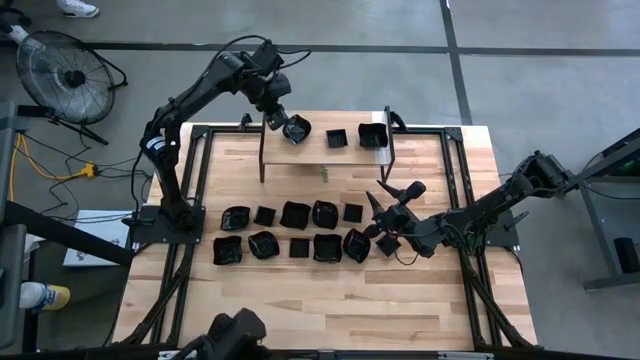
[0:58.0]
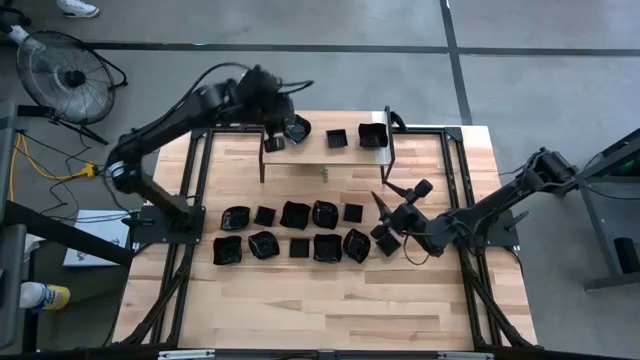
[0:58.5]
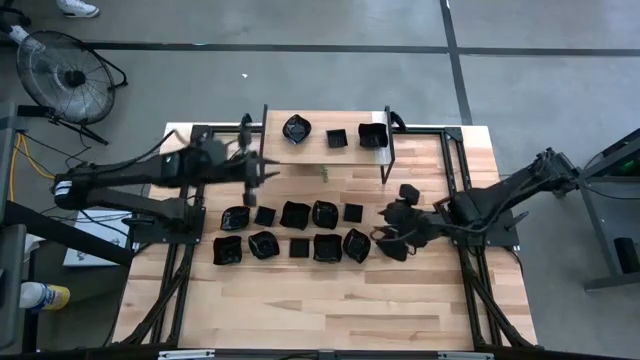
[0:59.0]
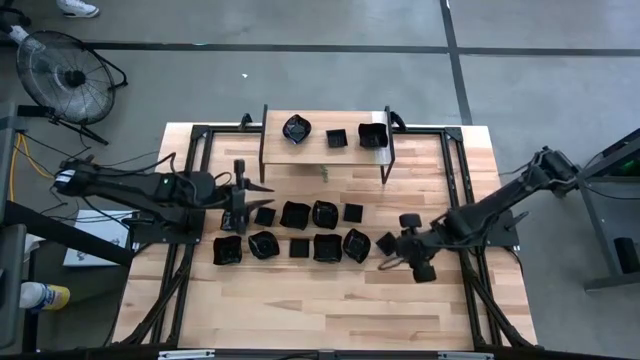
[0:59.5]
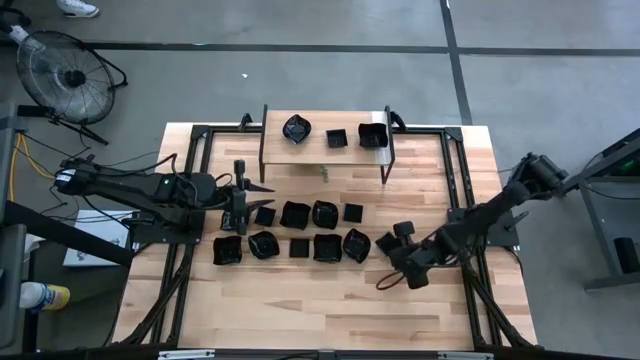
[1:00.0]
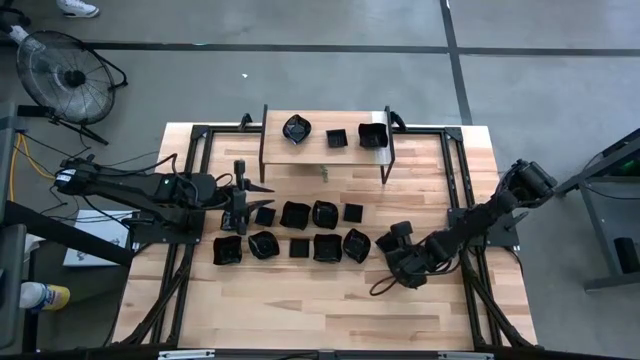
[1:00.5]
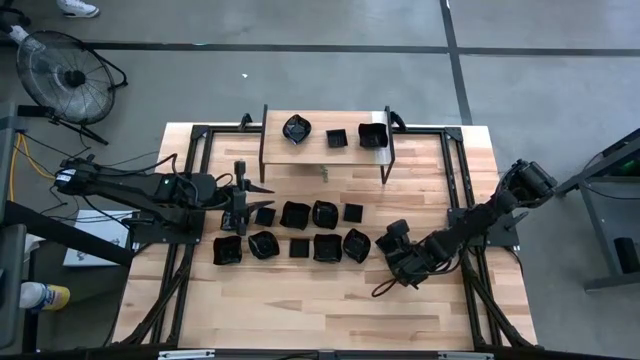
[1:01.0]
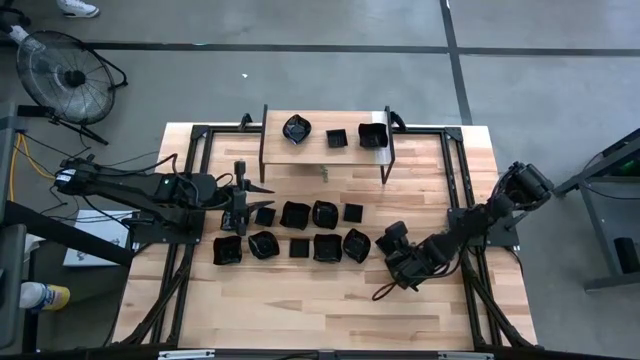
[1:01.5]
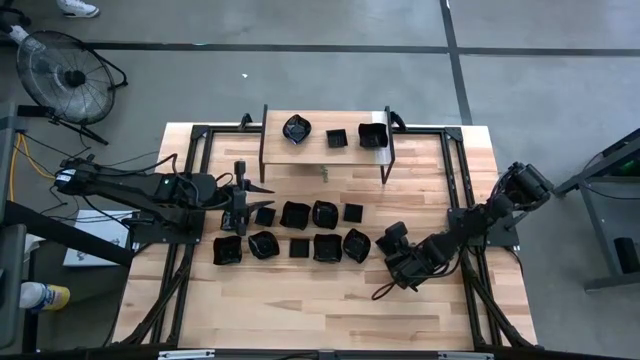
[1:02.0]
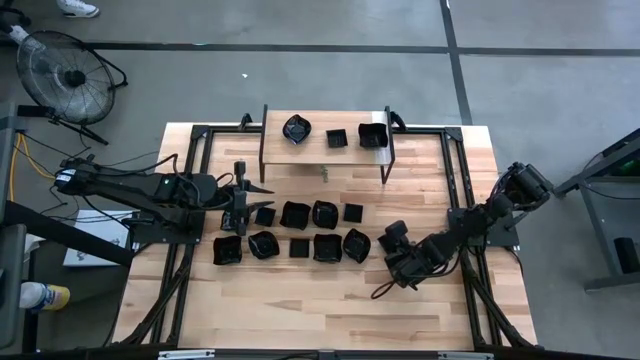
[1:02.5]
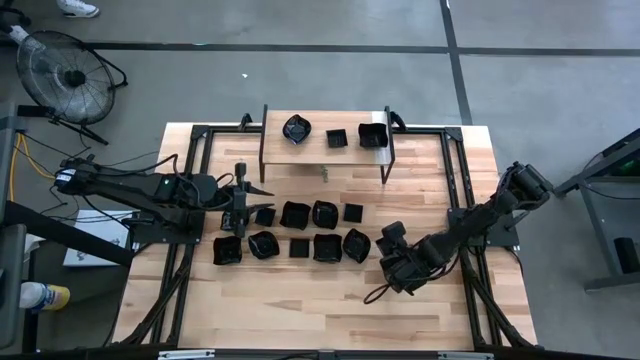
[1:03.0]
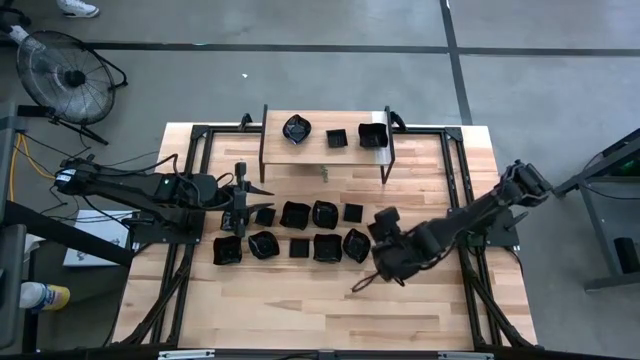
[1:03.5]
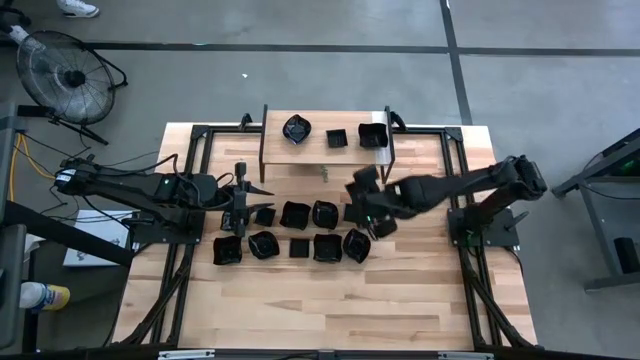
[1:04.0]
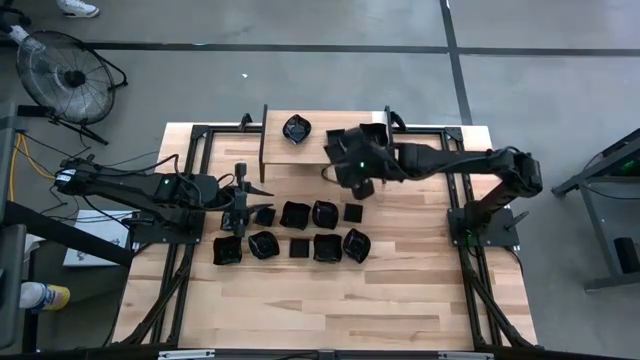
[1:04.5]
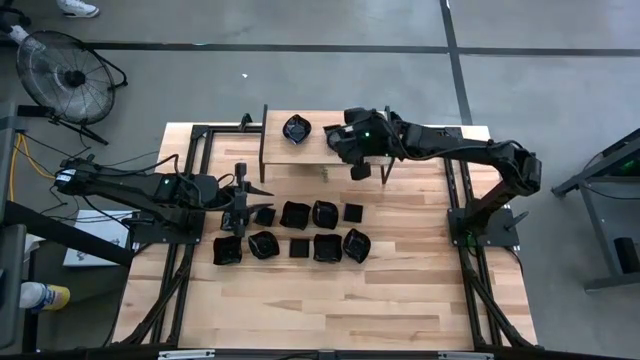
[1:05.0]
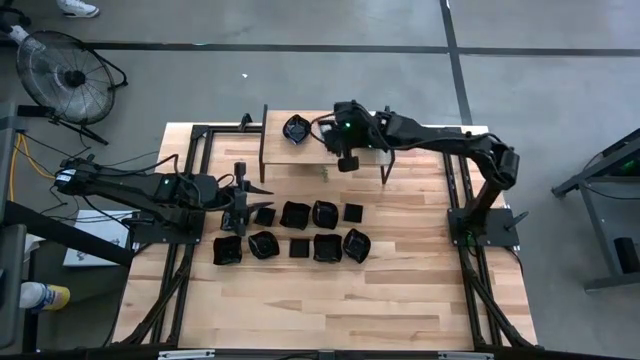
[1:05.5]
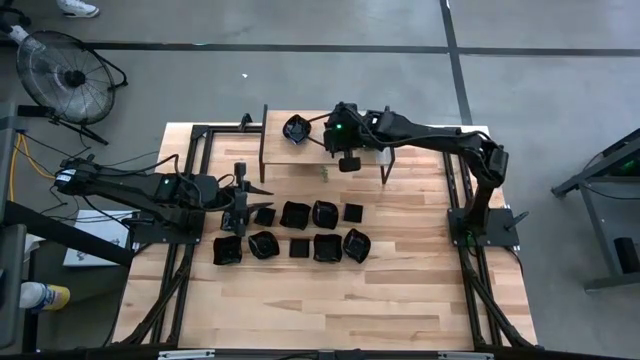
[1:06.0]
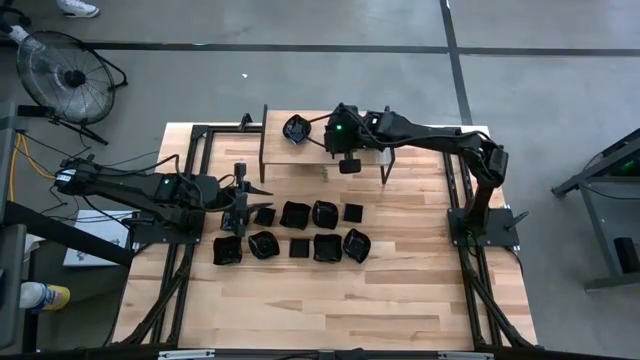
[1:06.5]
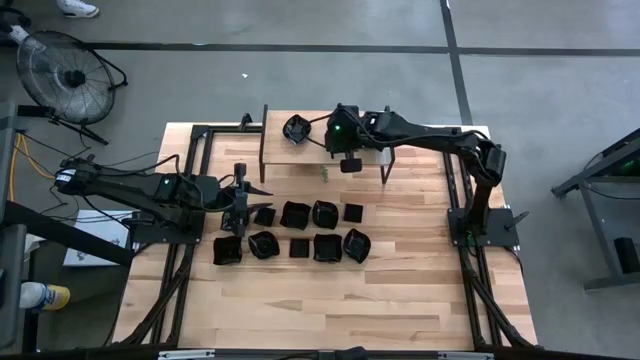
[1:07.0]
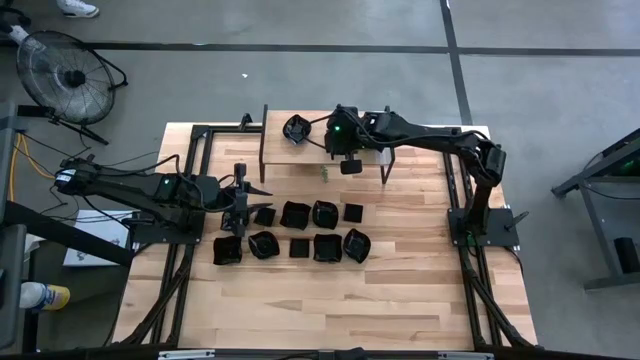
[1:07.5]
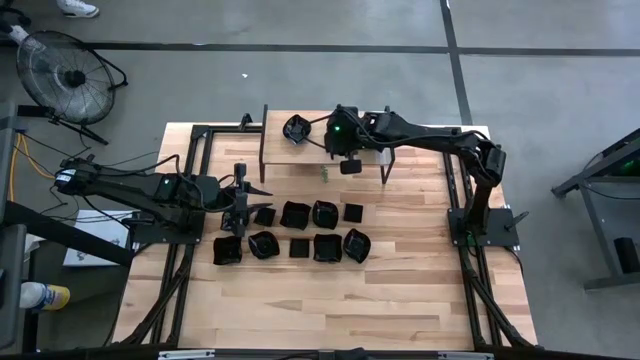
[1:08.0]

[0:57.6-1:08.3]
Task: Pick & Place Mini shaped plates
Stack the square plate on top of the other square plate on the shelf

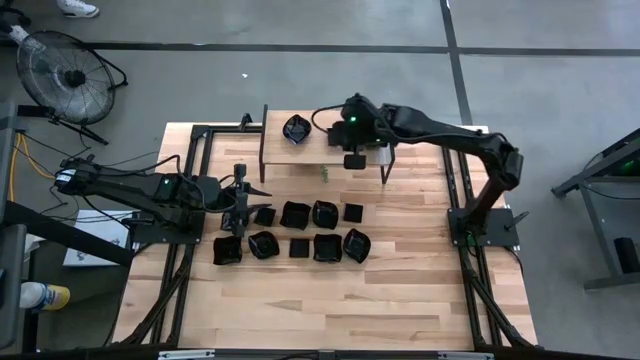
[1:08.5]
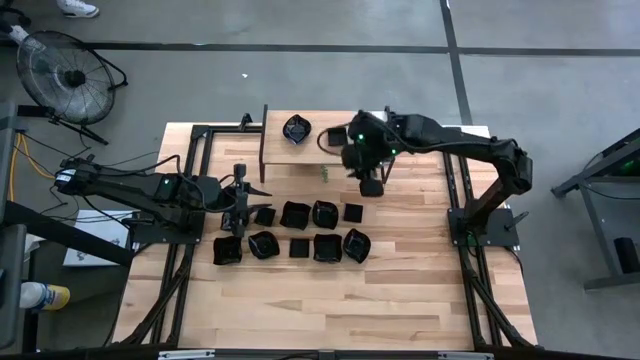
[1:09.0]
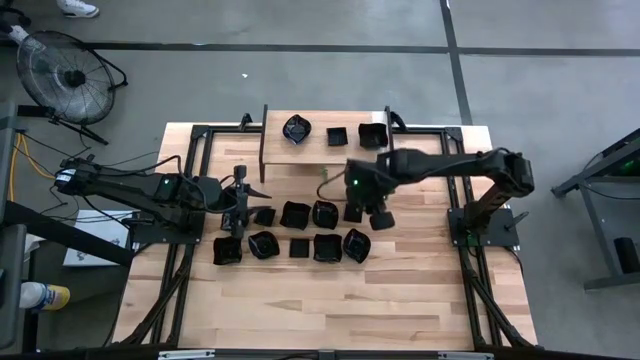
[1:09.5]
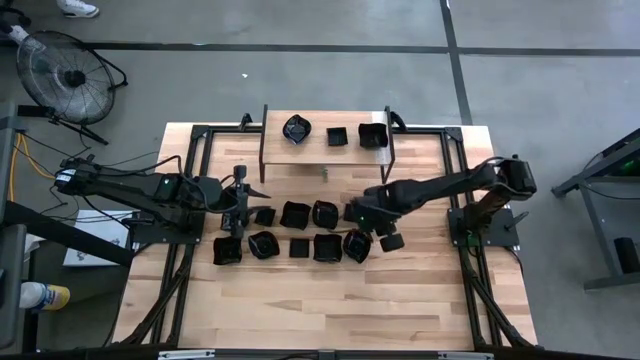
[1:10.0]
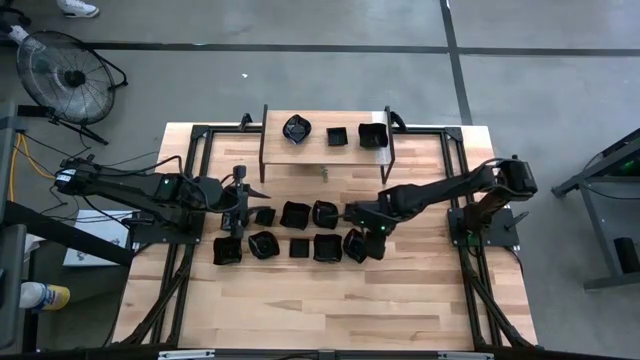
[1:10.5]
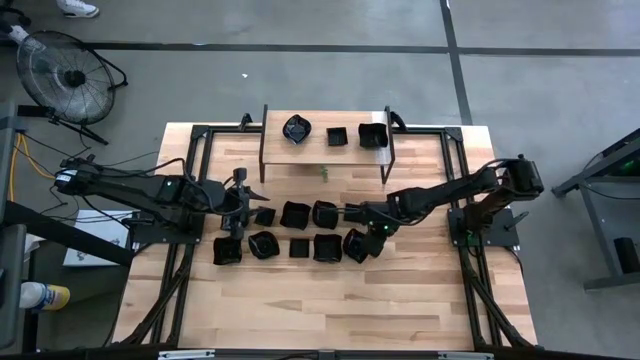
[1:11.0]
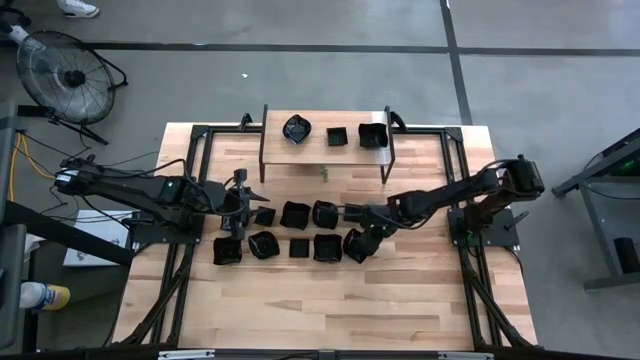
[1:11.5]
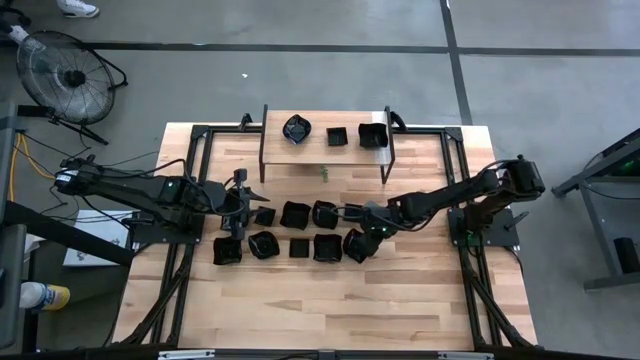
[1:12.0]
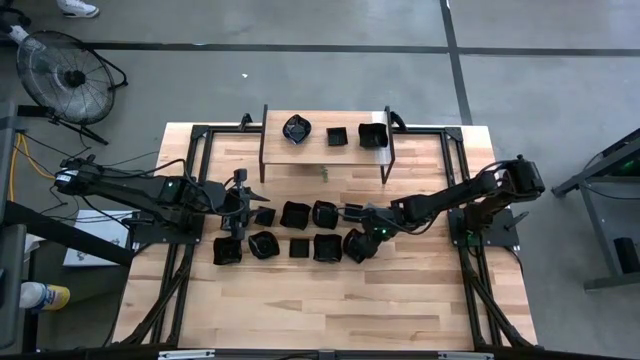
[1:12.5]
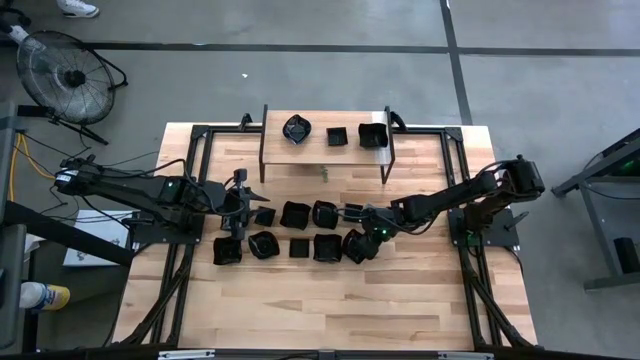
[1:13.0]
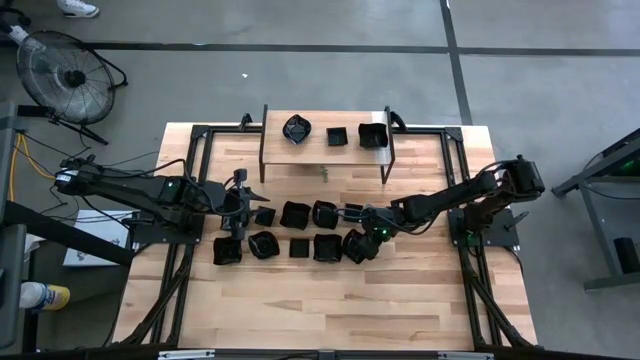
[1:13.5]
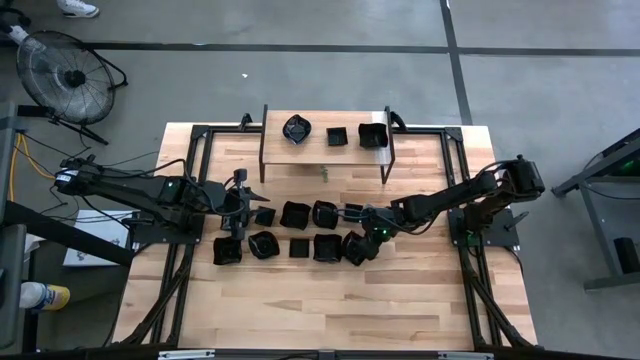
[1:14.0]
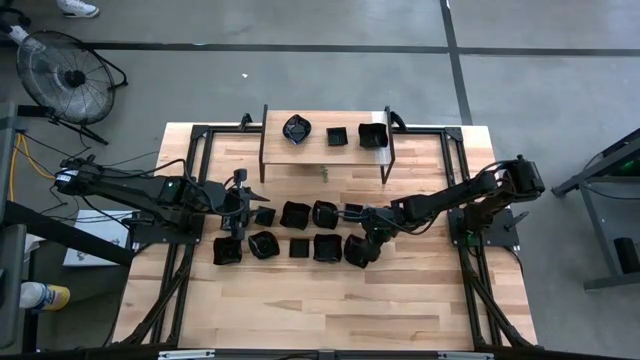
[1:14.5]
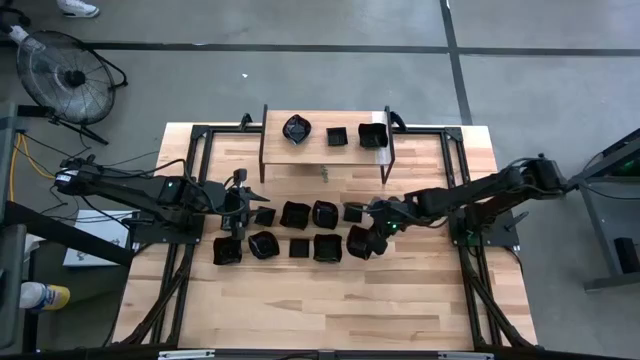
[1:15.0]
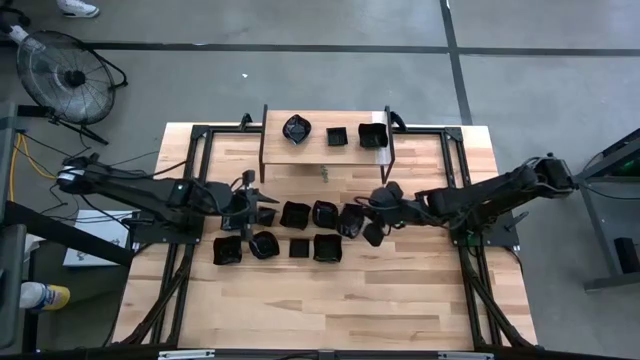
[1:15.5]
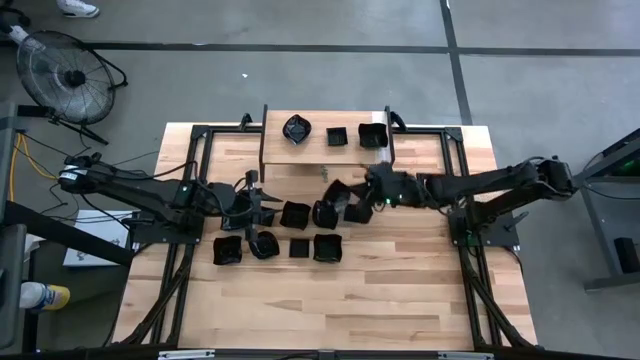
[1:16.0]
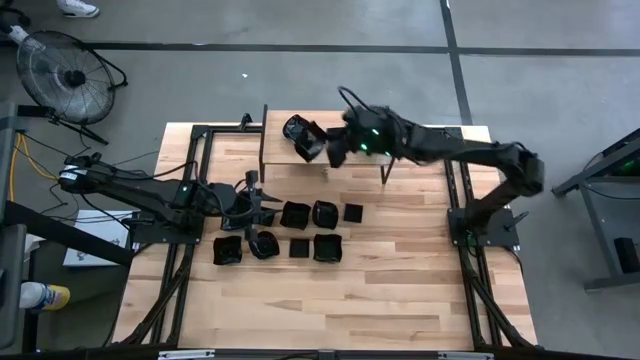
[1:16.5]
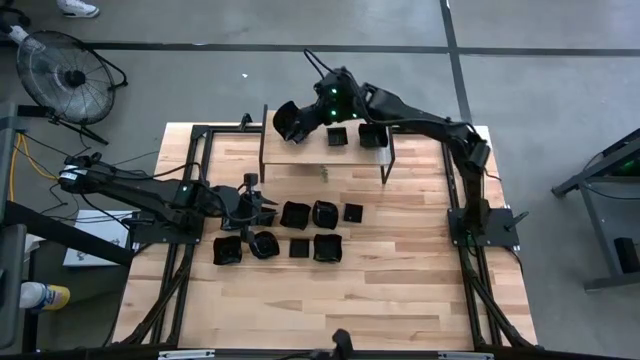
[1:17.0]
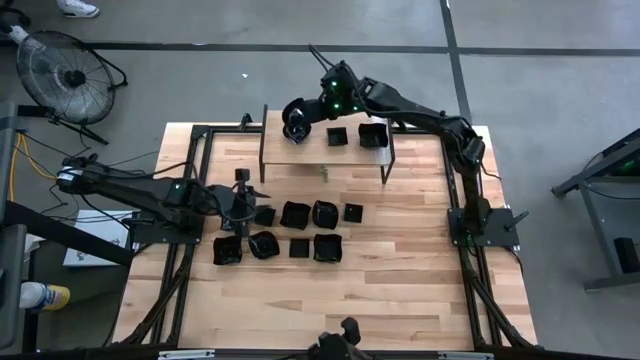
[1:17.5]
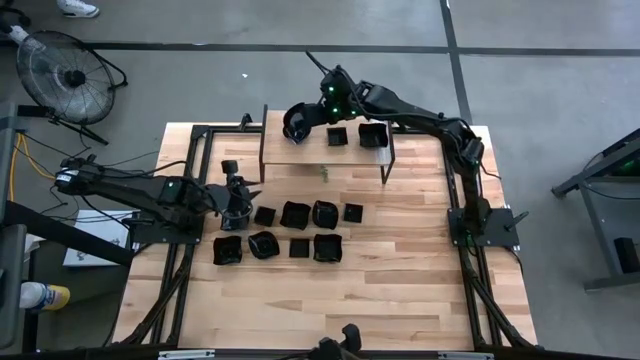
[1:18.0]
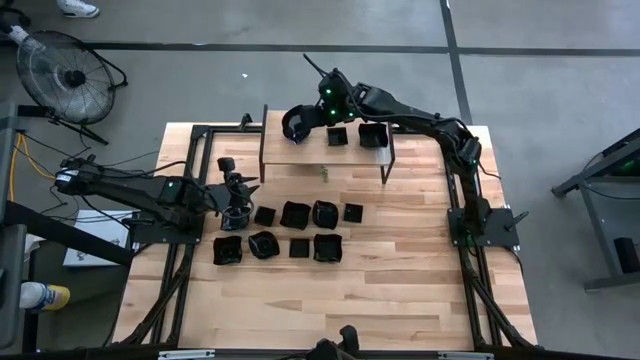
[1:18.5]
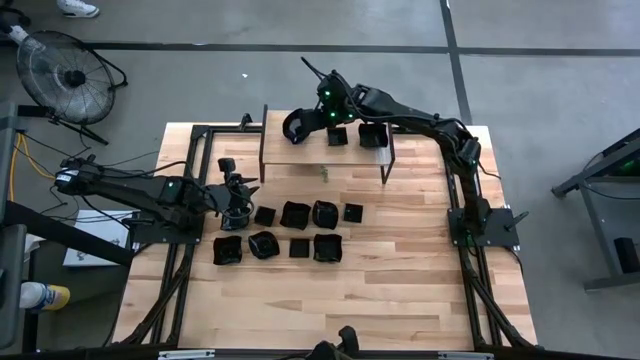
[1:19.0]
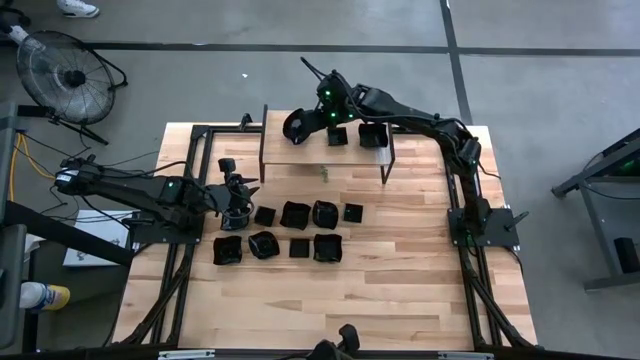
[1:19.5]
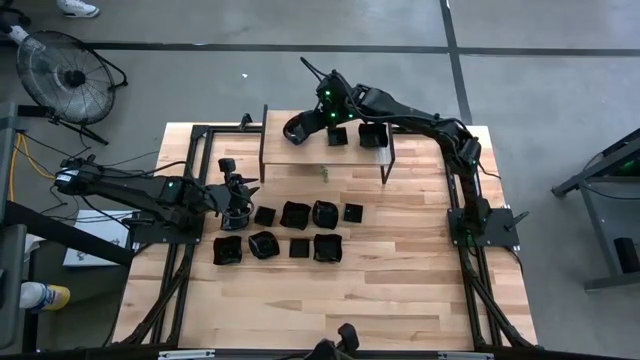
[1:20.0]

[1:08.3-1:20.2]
Stack the leaf shaped plate on top of the other leaf shaped plate on the shelf
